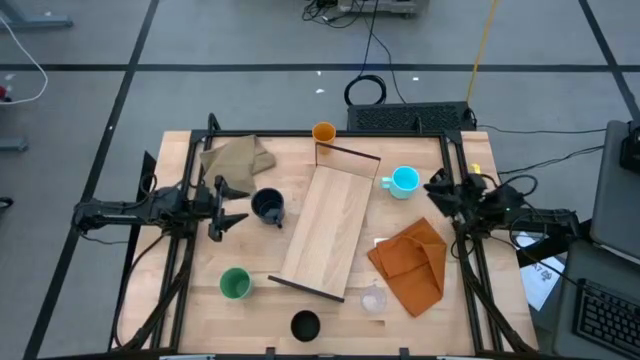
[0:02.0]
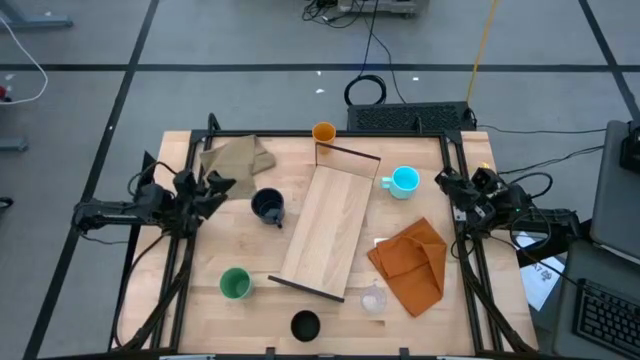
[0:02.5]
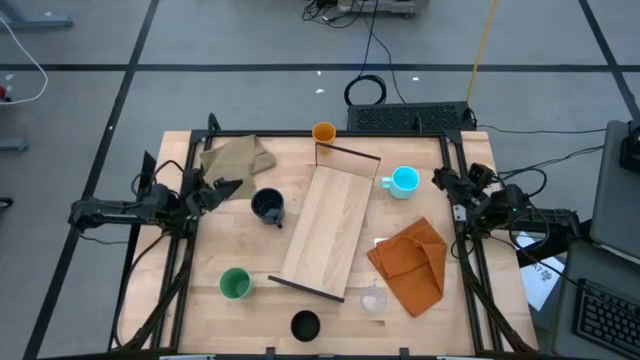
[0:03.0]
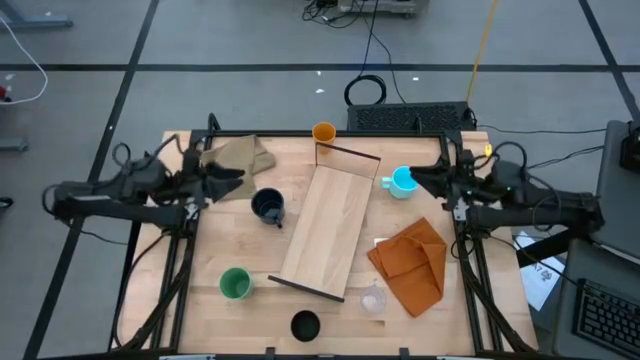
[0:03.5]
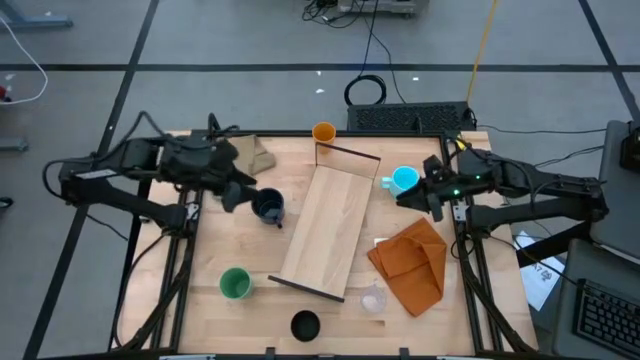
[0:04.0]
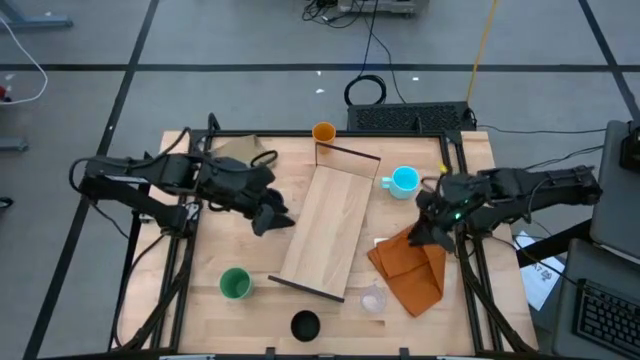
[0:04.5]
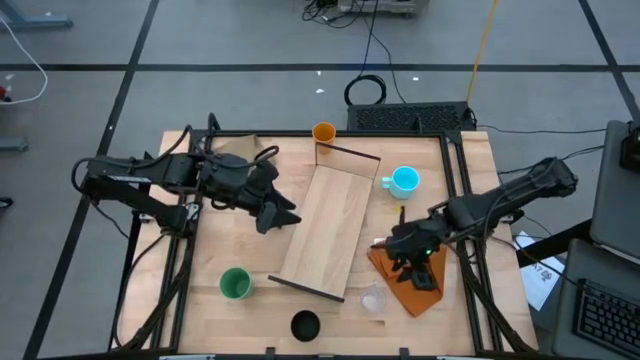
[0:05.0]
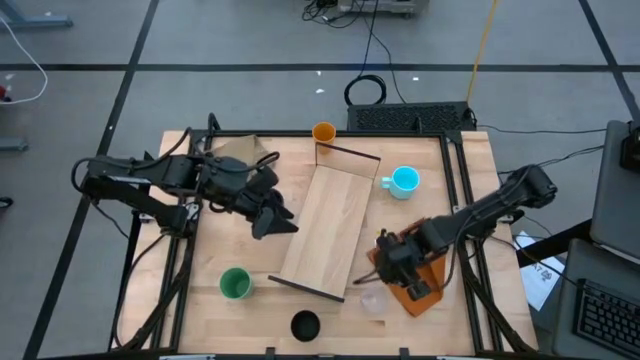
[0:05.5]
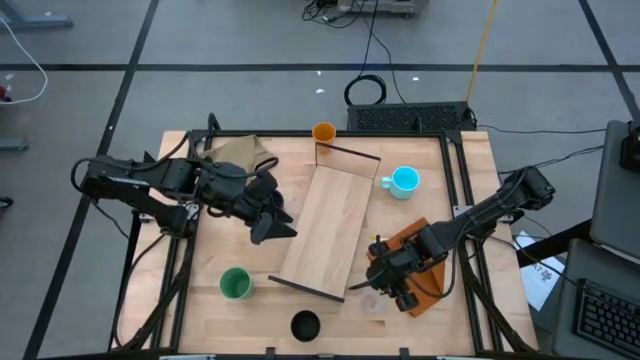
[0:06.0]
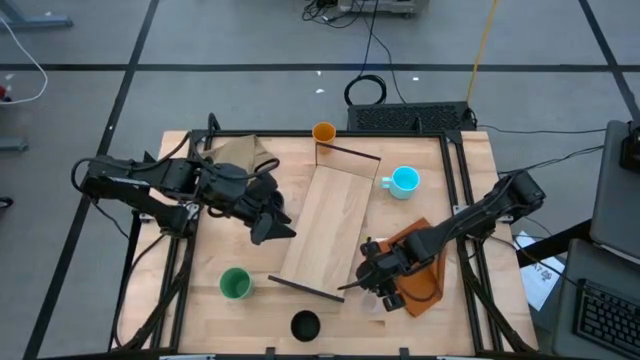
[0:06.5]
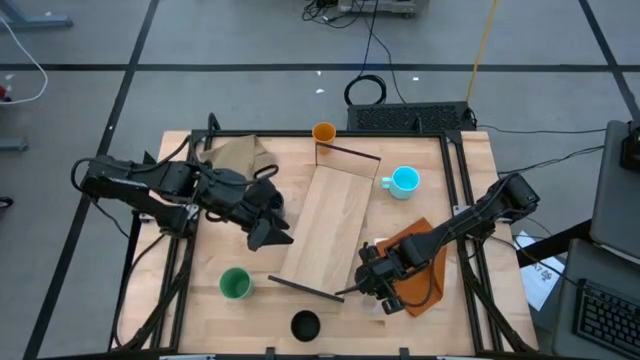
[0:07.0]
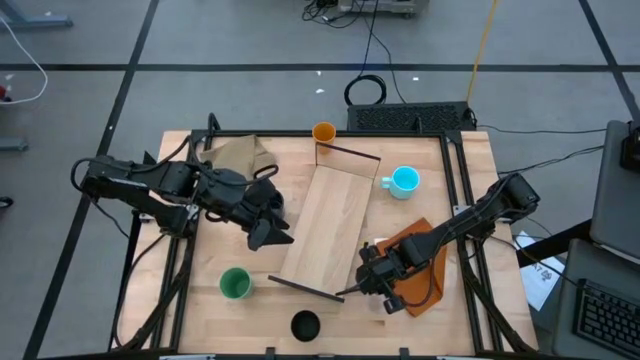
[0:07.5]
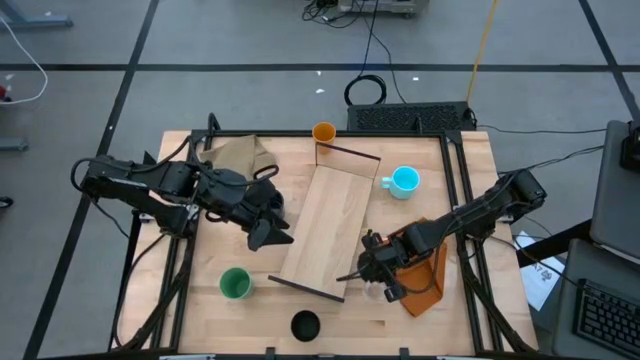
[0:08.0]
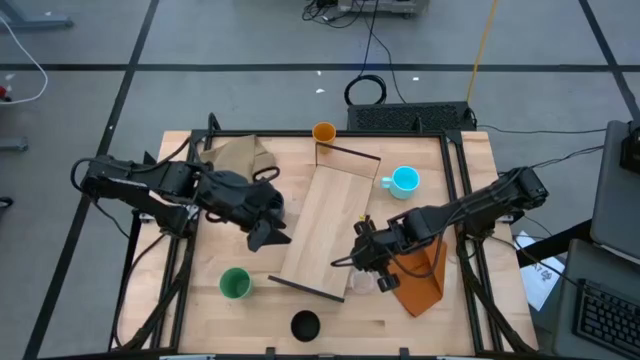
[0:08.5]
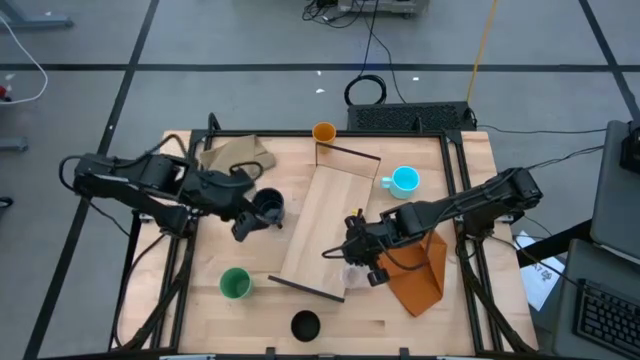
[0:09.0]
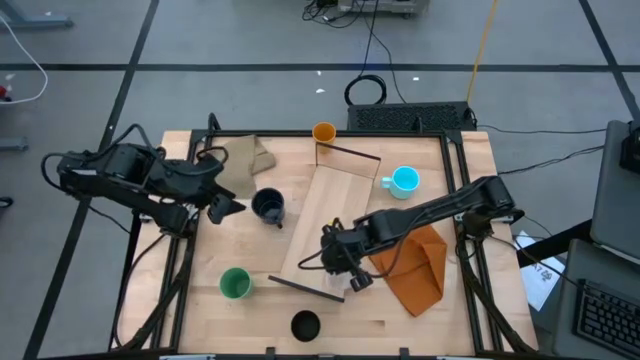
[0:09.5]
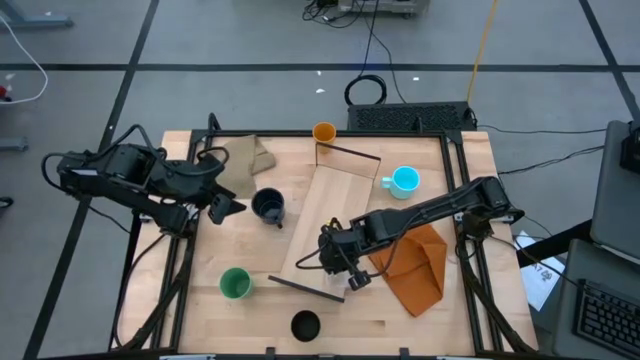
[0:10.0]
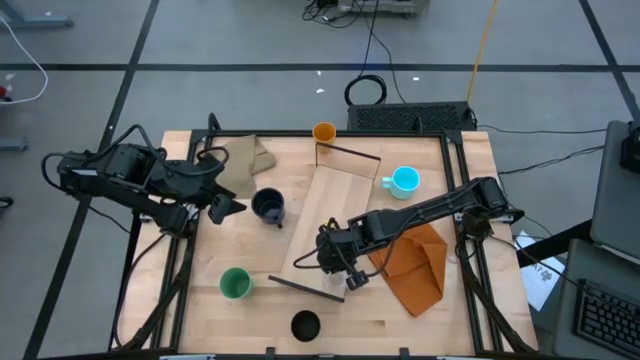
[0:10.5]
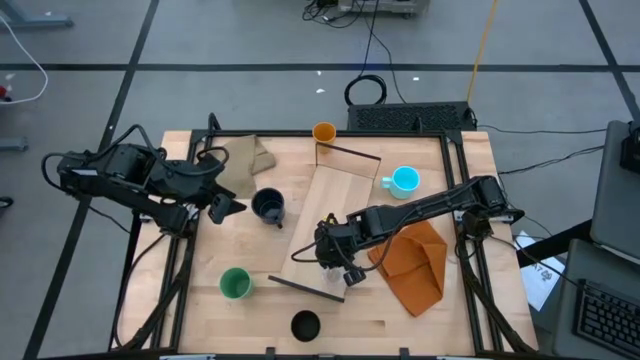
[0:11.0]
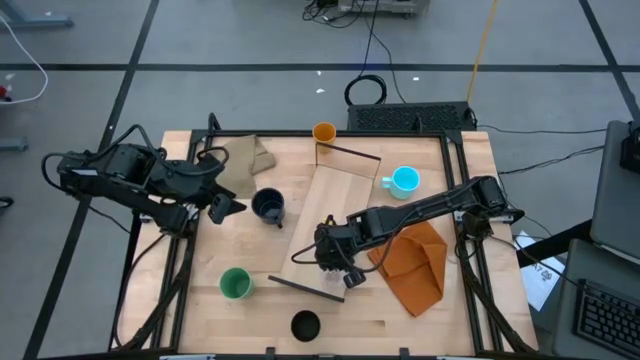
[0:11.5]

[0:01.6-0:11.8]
Task: Stack small to large cups/mugs on shelf
Put the transparent mug on the shelf

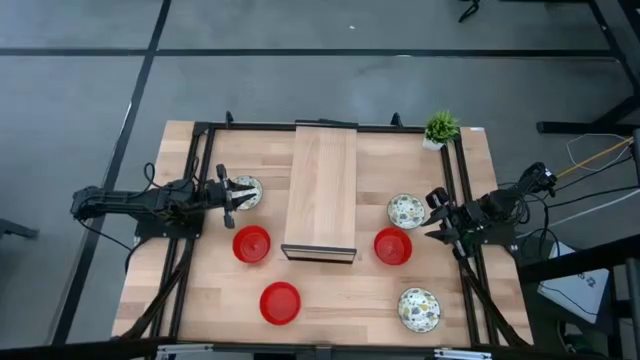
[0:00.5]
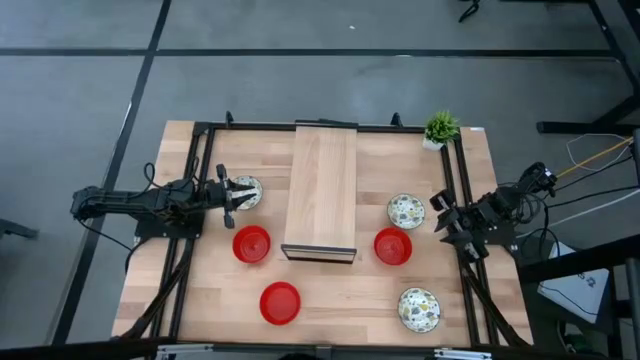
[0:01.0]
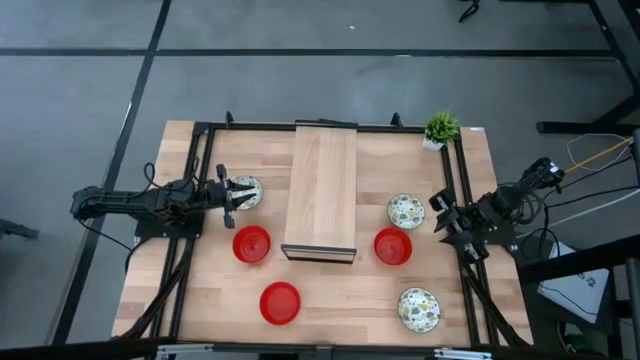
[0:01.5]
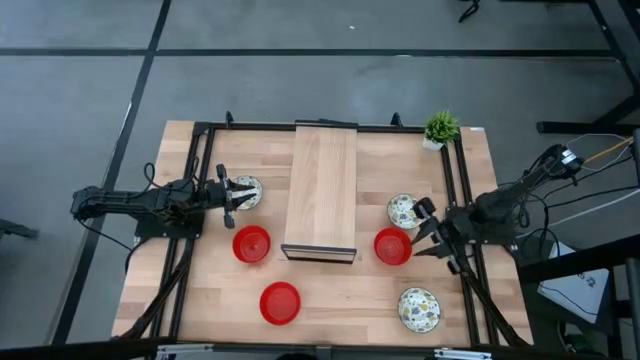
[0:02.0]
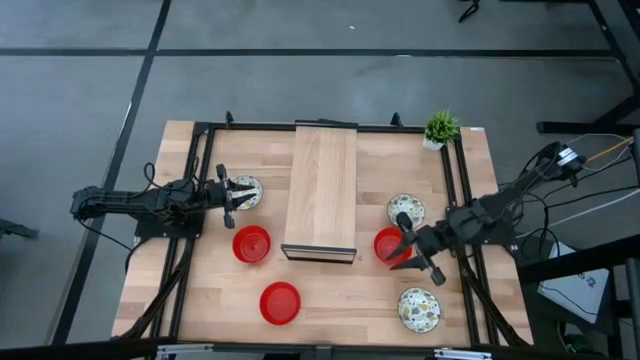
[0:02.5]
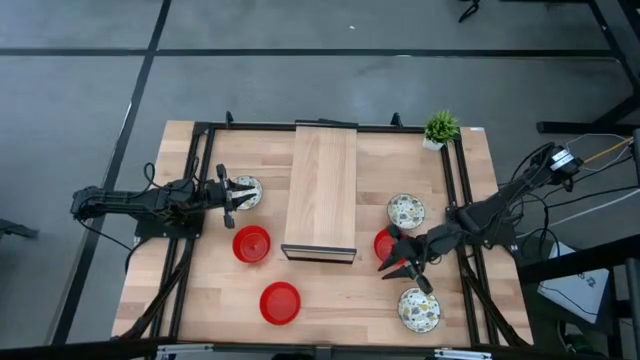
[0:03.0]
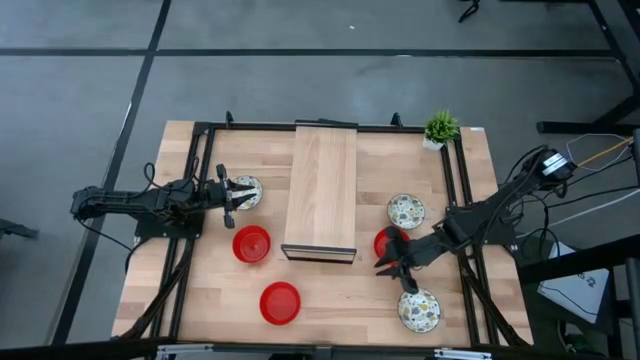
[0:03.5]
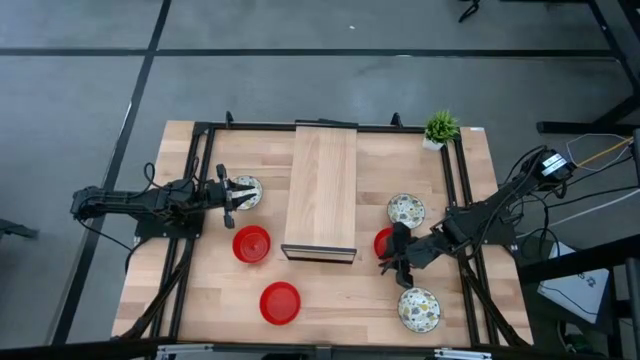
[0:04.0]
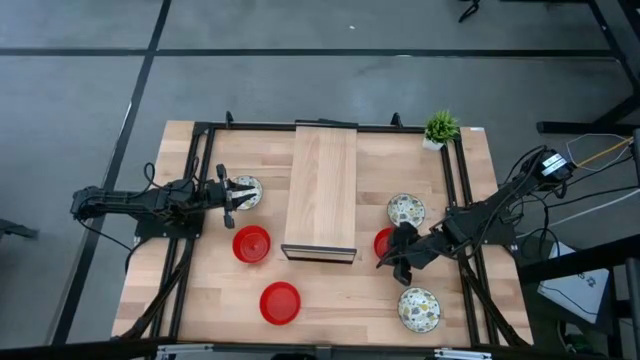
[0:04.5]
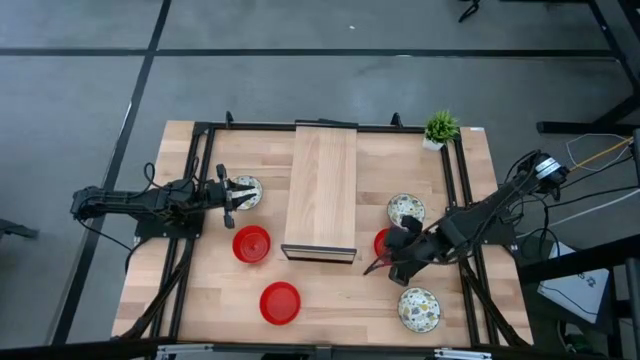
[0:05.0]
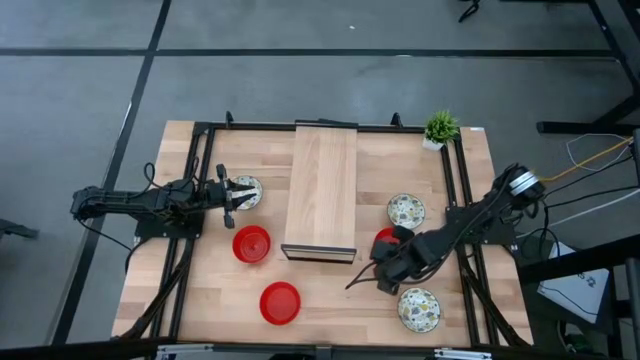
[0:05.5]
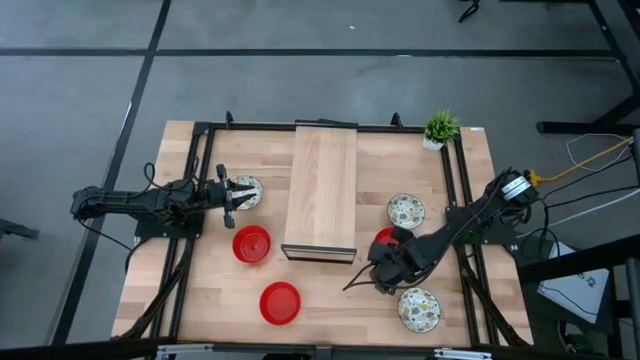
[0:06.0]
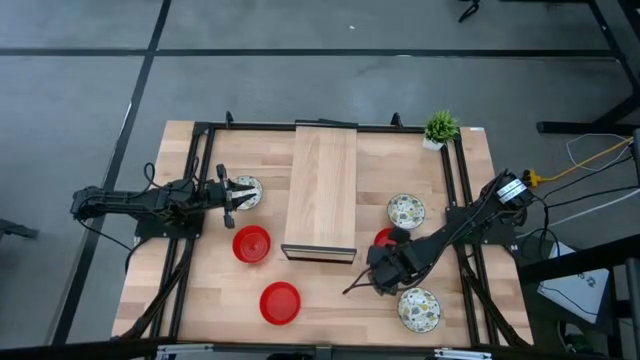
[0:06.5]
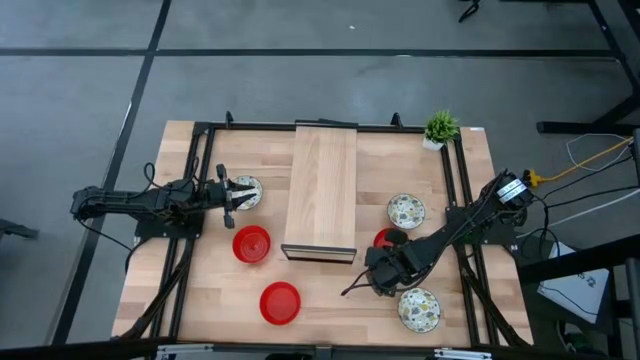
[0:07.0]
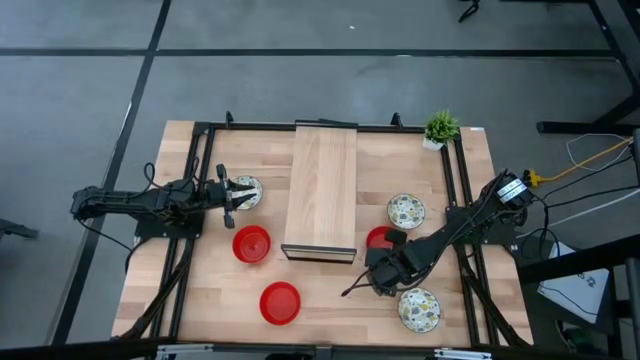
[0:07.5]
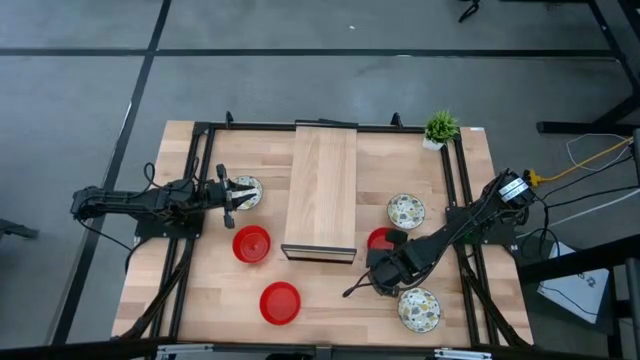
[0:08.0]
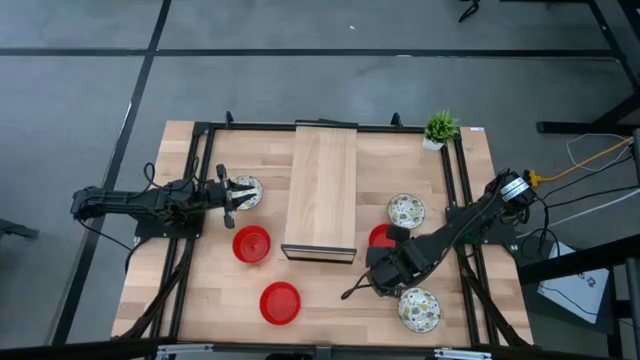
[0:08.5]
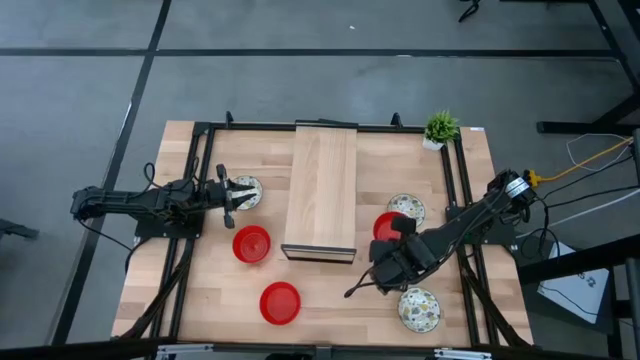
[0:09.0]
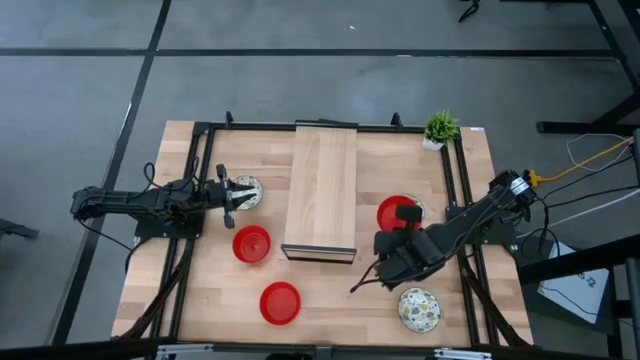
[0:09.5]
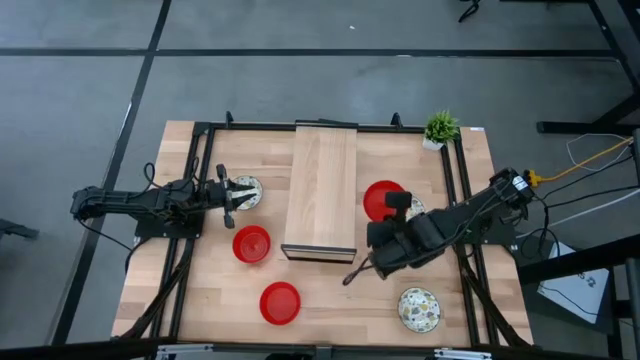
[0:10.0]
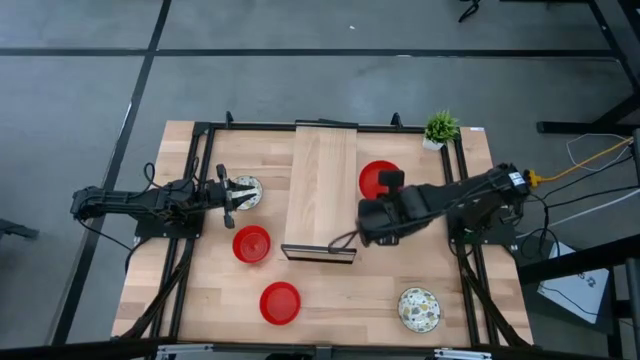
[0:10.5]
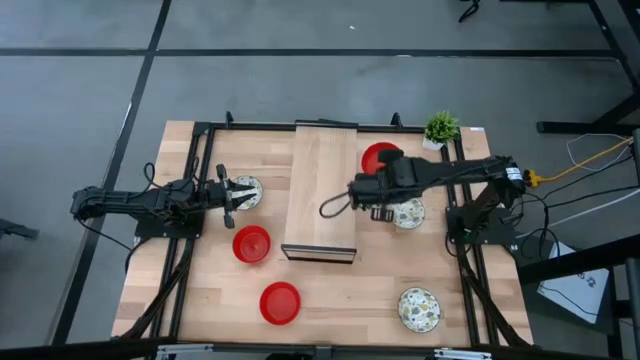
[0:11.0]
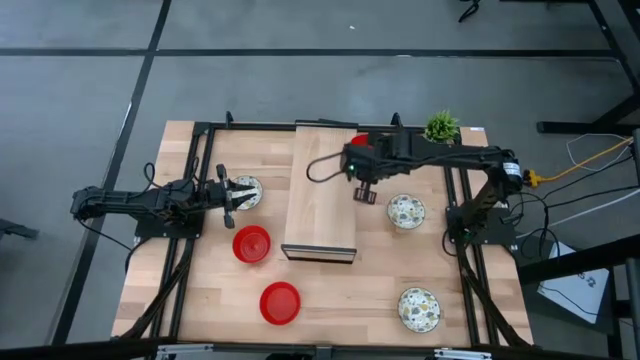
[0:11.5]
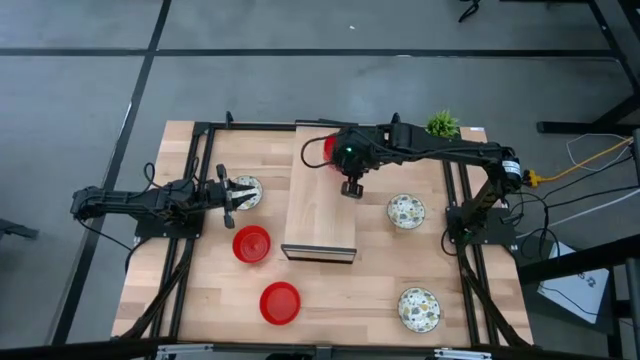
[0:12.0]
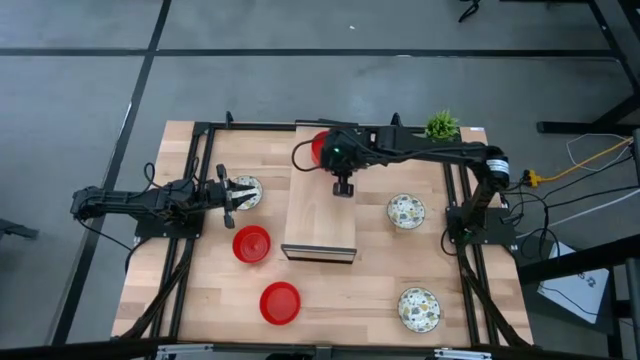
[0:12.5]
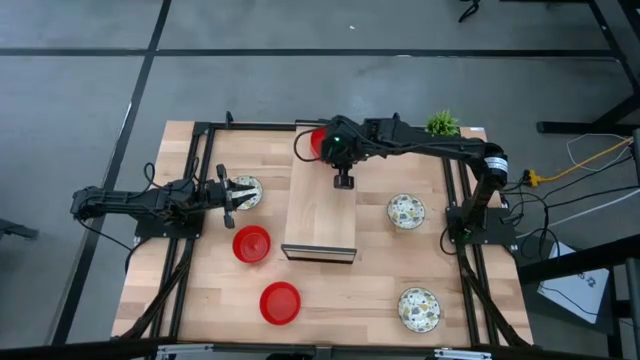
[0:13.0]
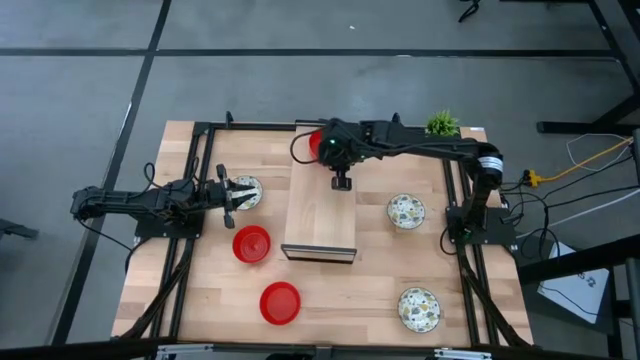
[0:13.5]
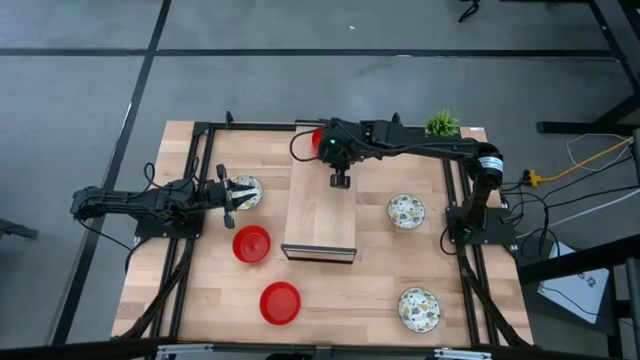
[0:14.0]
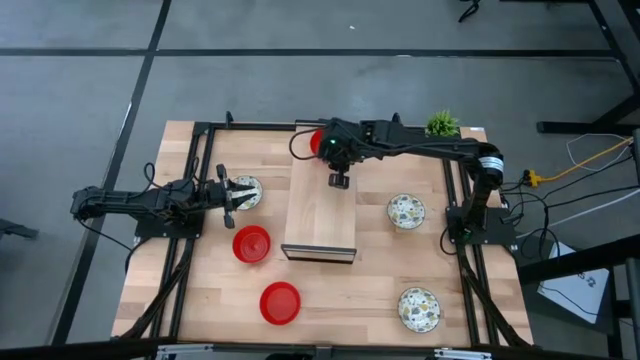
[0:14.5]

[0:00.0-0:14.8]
Task: Pick & Place Mini bowls
Put the right red bowl on the shelf
